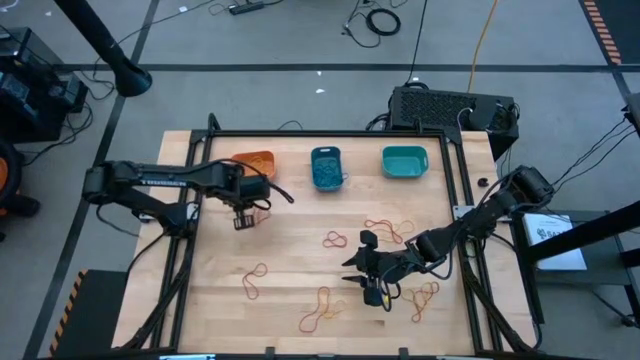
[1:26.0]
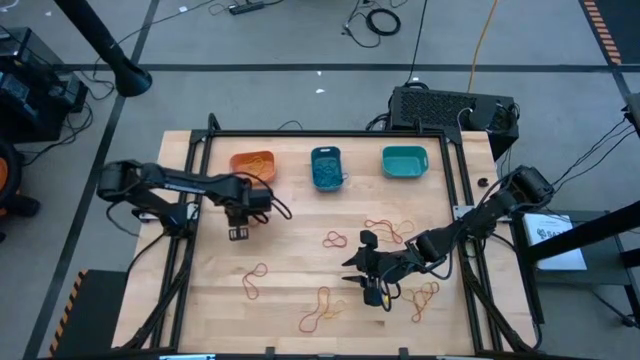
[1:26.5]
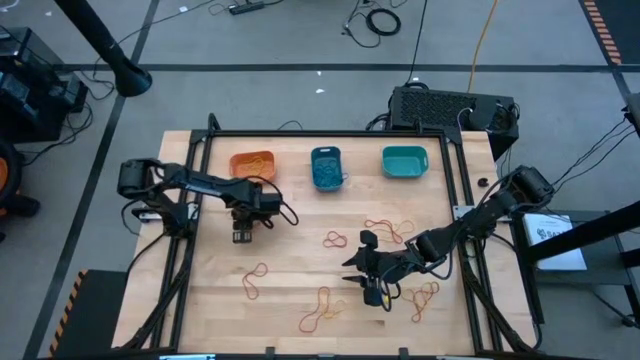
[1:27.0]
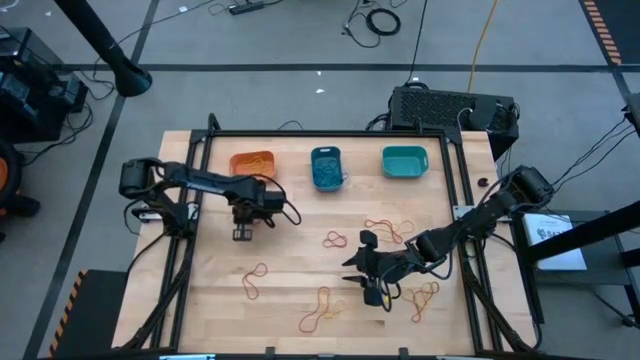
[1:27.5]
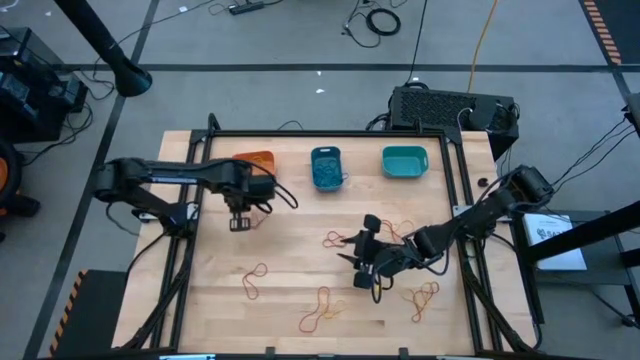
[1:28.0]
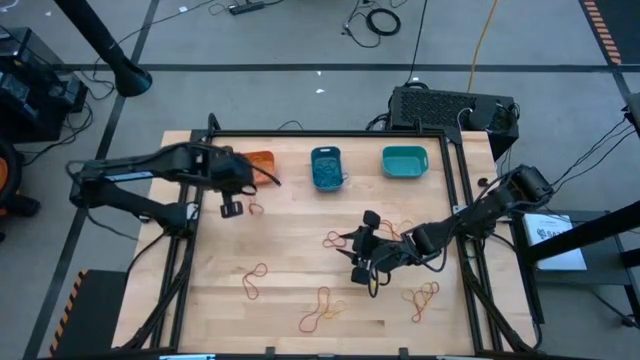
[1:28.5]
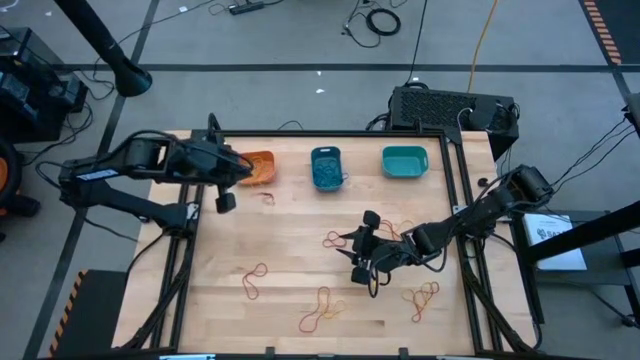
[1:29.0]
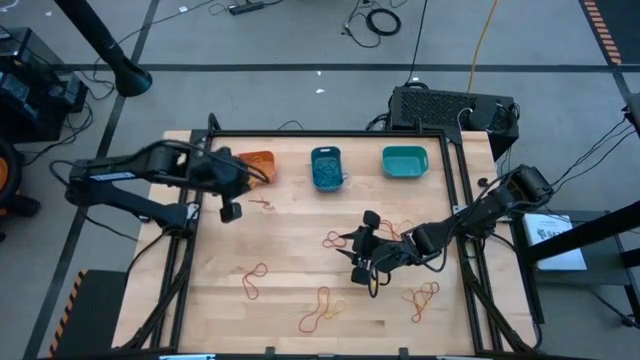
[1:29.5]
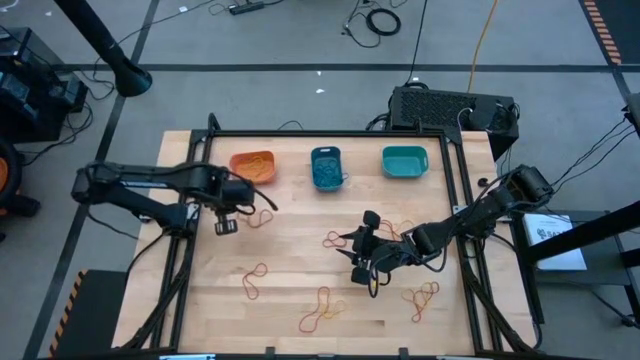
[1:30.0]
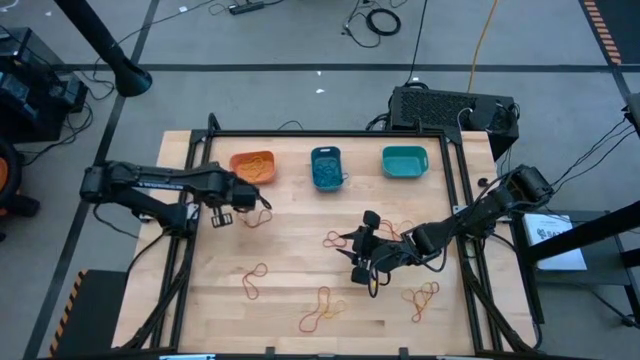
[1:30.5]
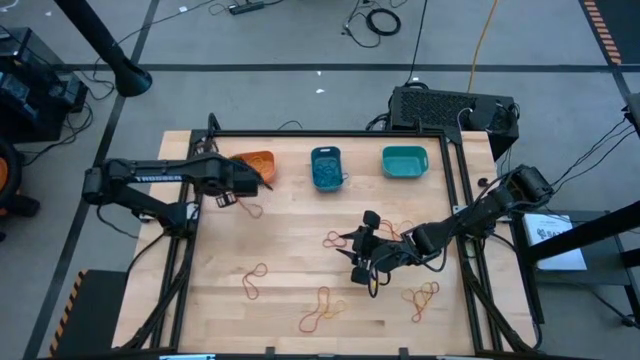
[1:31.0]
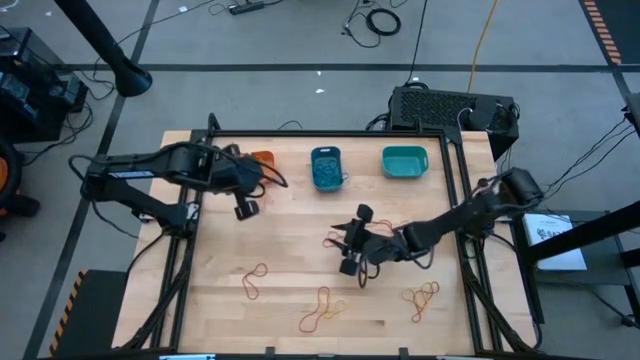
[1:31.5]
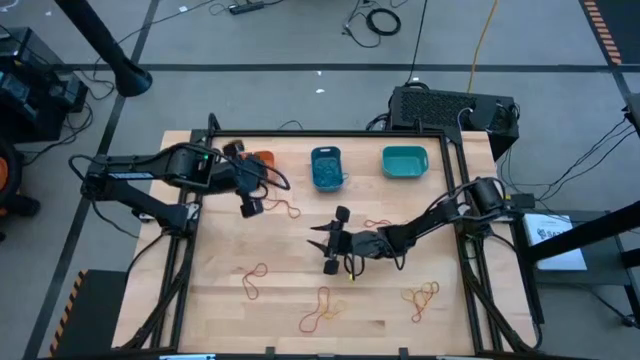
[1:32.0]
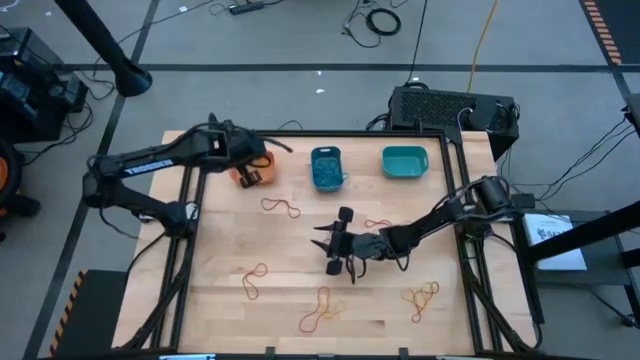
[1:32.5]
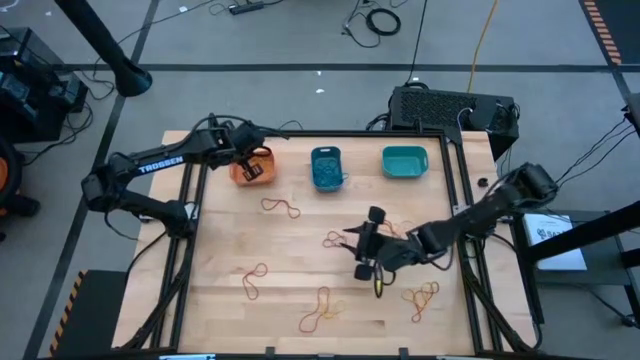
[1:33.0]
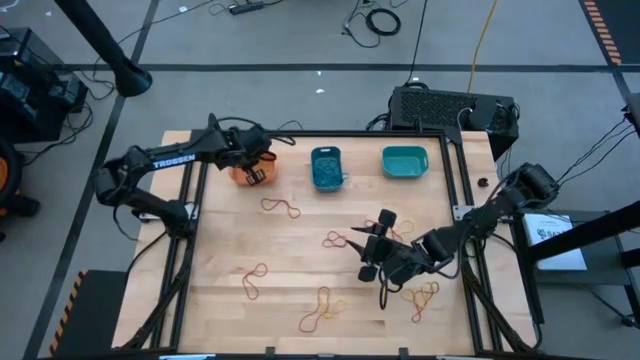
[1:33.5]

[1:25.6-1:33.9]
Task: Sort rubber bands into baskets
Put the yellow rubber band into the orange bin

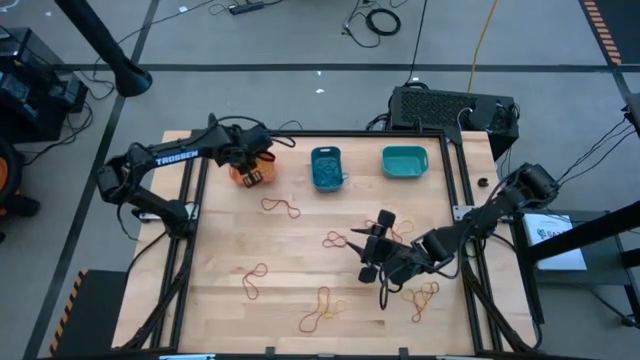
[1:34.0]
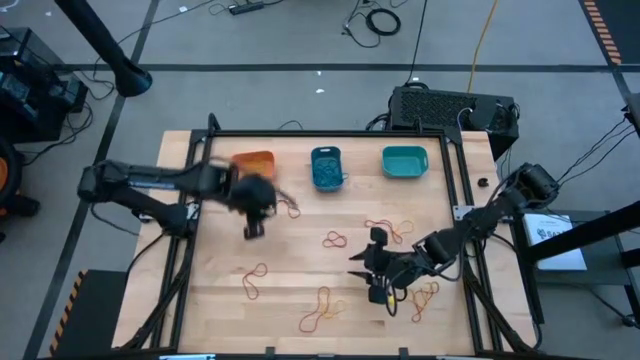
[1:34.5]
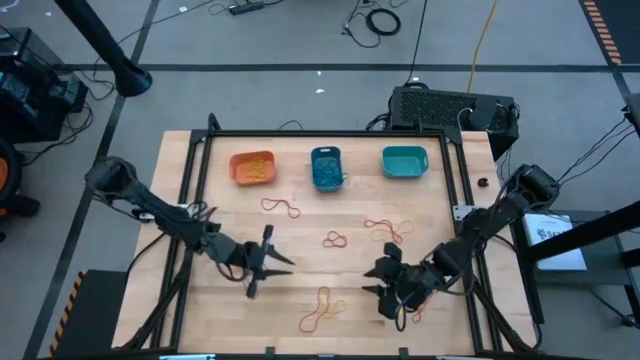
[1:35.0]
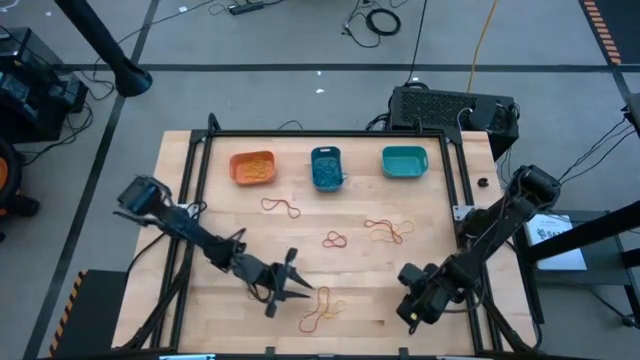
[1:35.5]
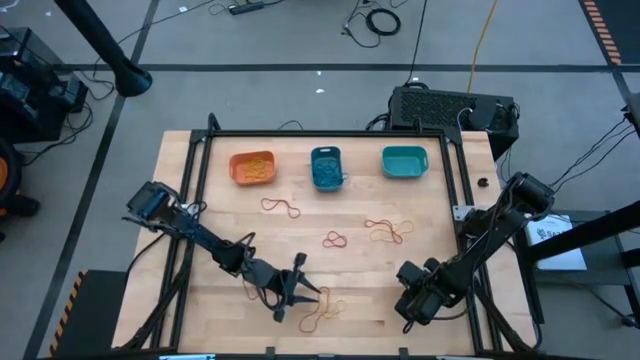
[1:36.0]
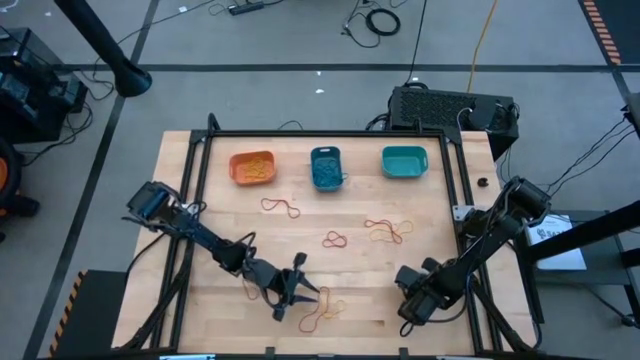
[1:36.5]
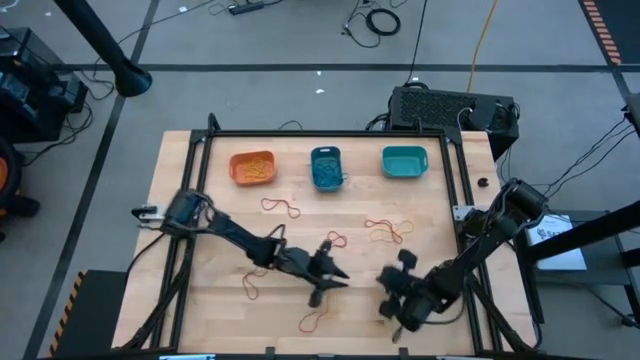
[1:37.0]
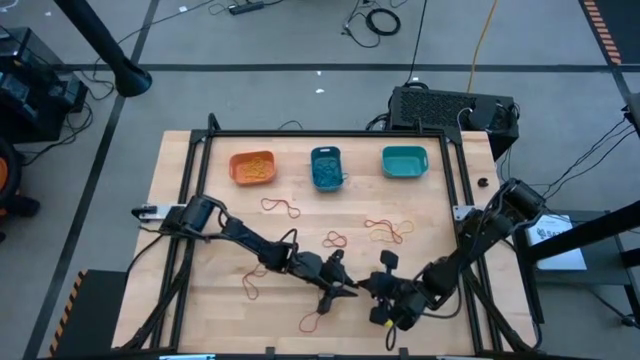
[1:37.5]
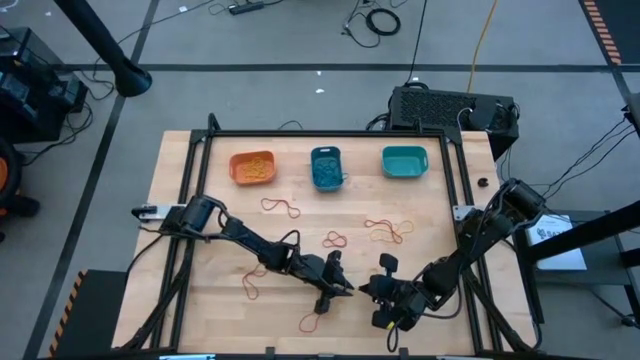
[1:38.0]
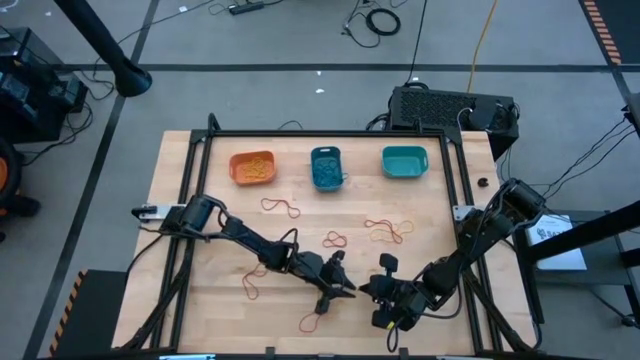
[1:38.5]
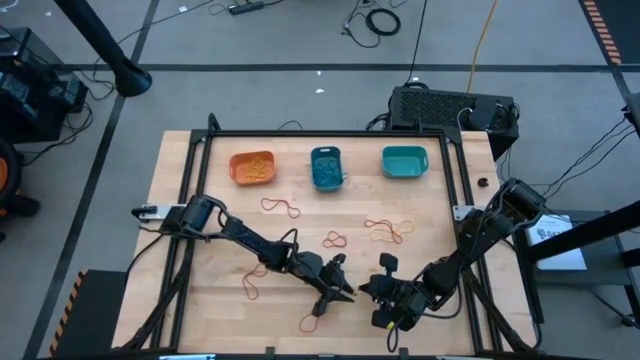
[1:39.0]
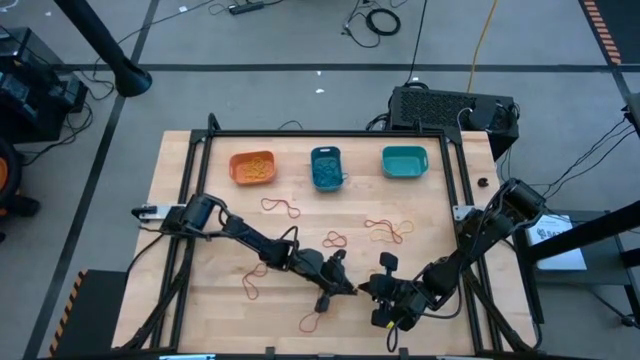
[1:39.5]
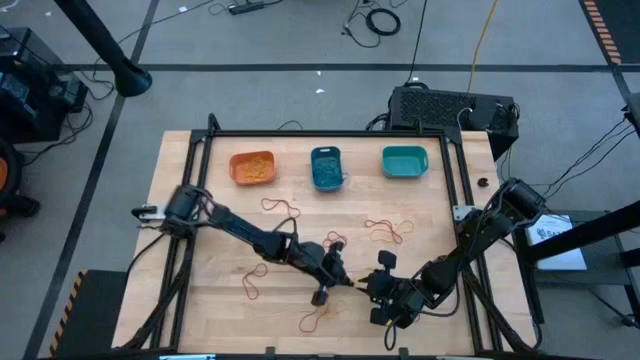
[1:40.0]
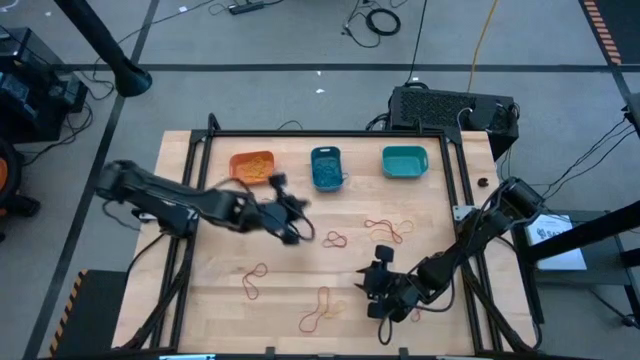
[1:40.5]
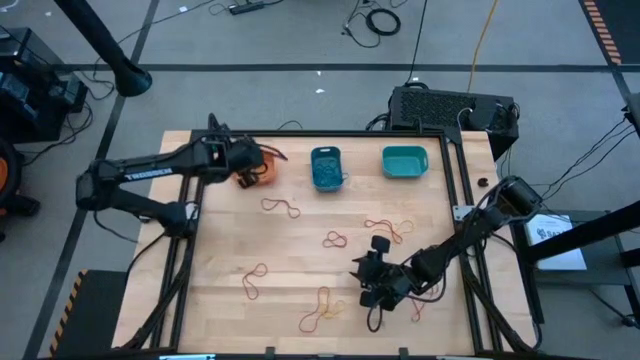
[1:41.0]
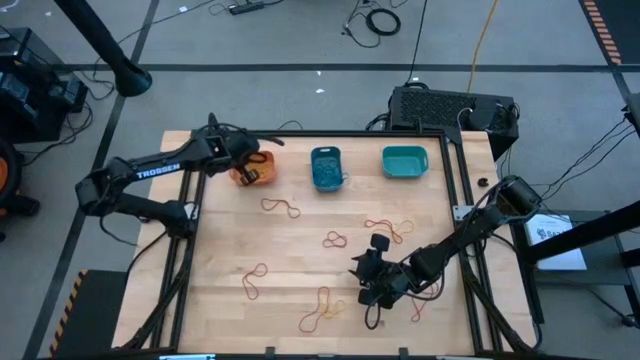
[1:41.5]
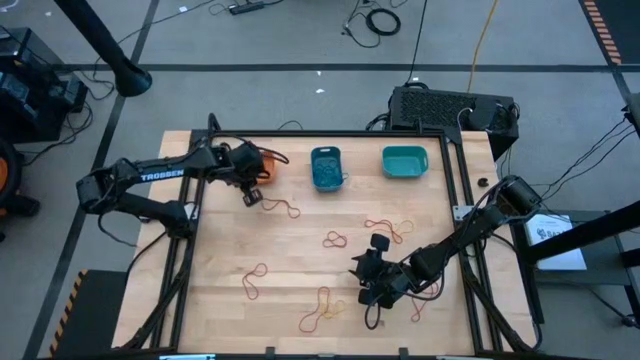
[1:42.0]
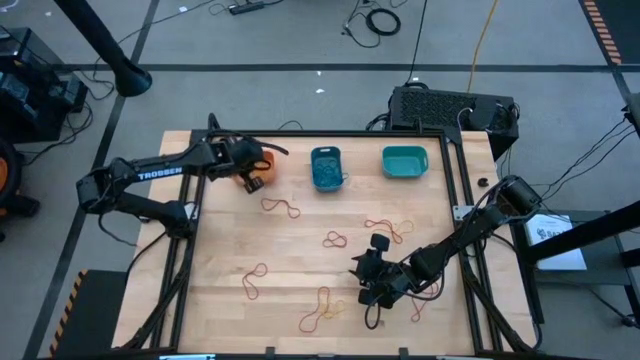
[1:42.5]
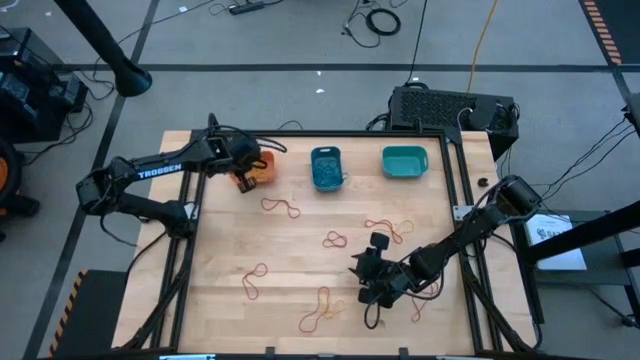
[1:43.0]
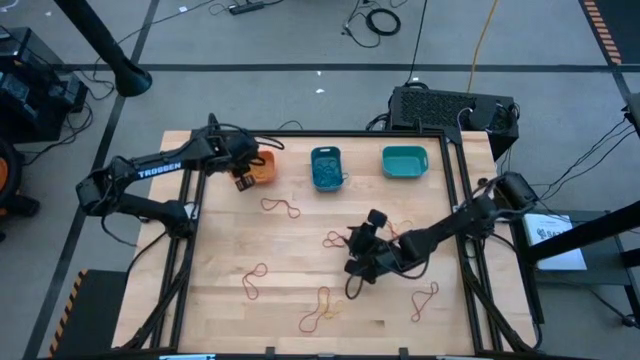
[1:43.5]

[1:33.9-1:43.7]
Put the yellow rubber band into the orange bin

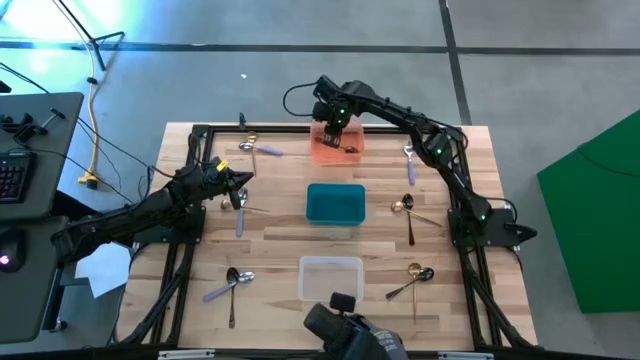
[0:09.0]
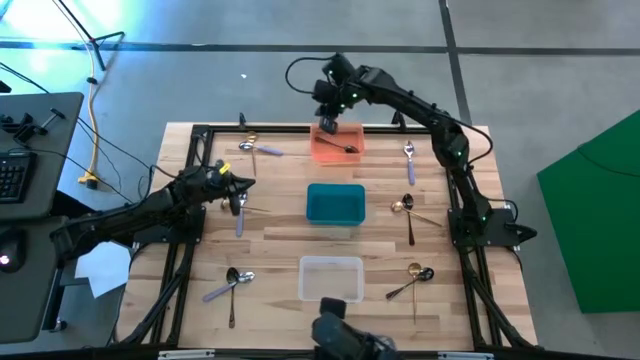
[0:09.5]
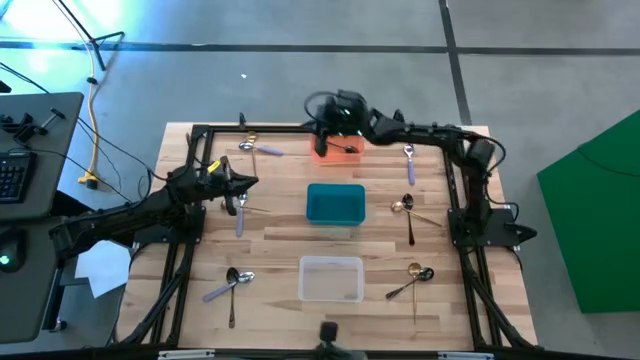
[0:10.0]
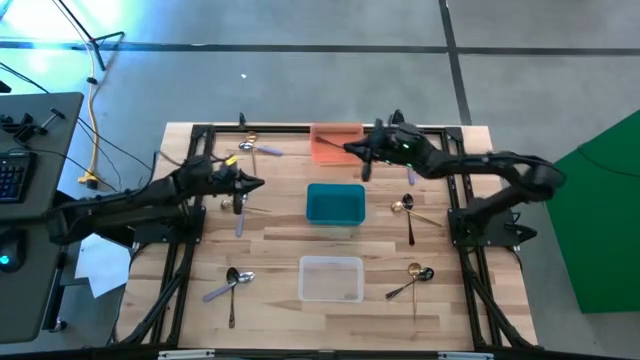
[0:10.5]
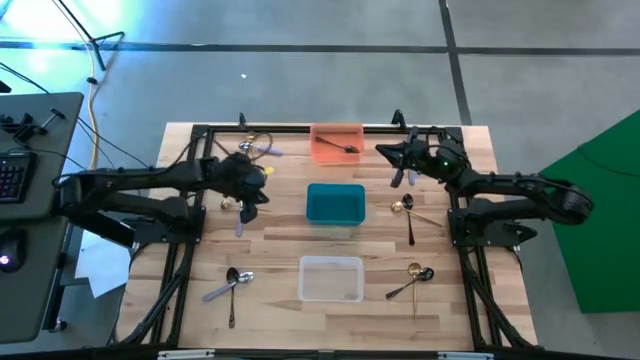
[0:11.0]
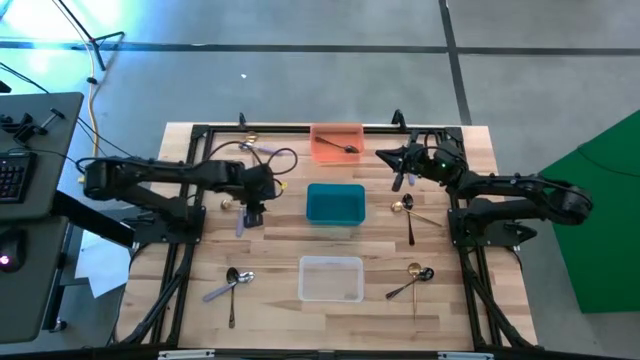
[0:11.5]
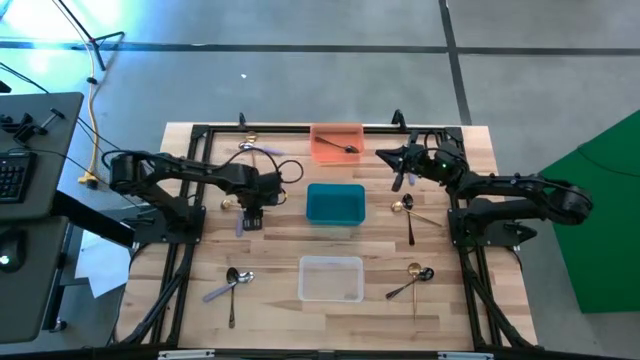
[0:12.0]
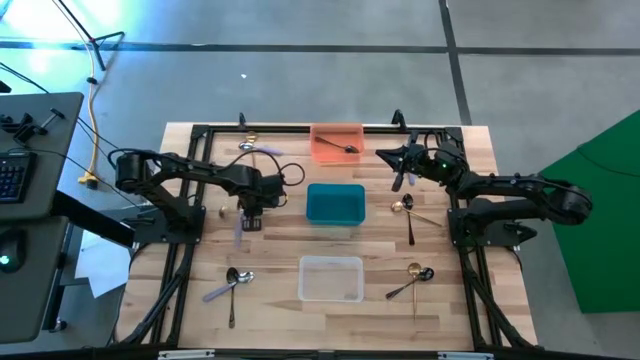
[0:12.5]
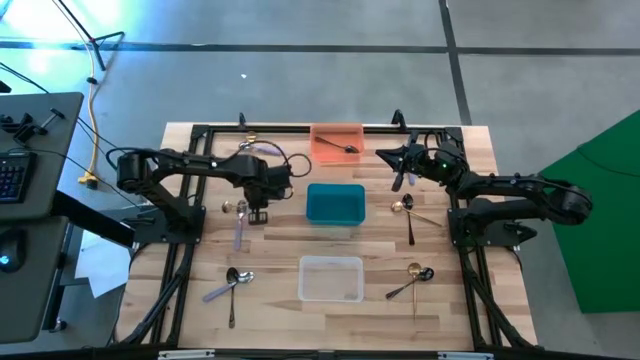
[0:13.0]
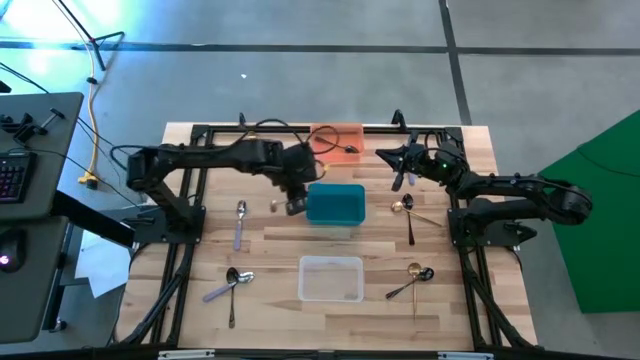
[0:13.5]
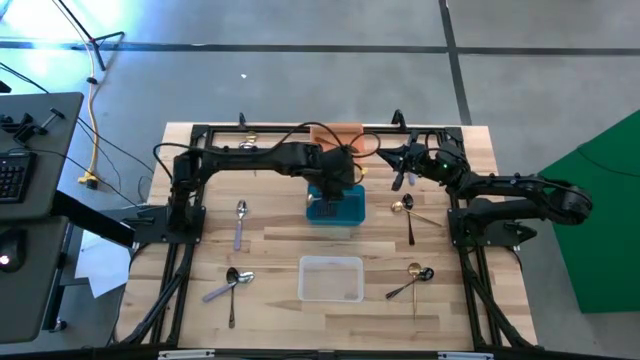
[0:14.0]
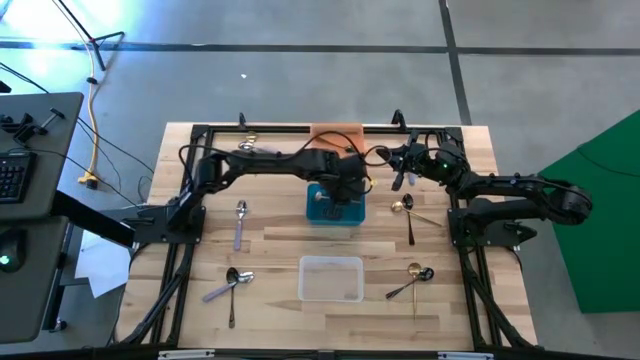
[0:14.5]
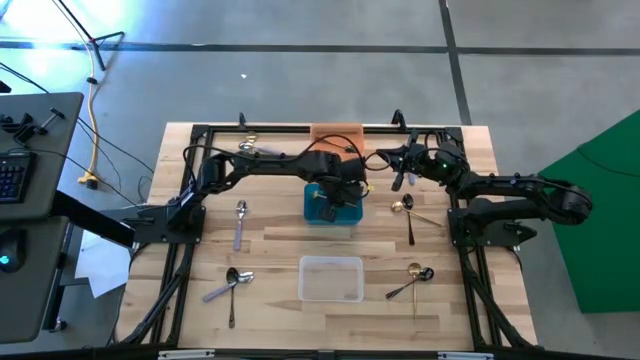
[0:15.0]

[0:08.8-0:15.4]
Task: Sort silverware by color (type)
Put the gold spoon into the dark green bin
